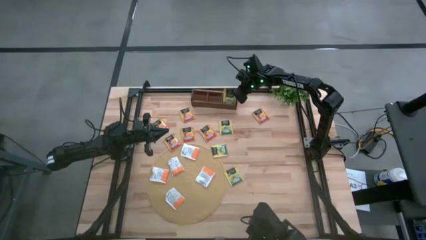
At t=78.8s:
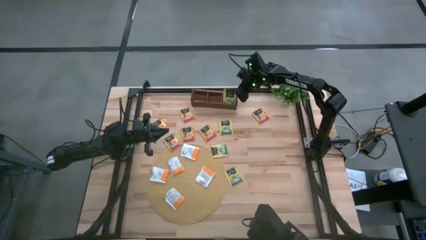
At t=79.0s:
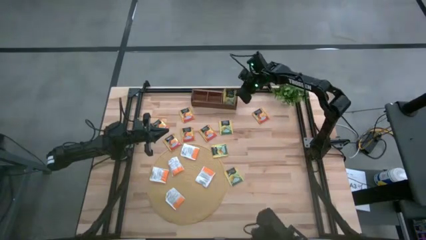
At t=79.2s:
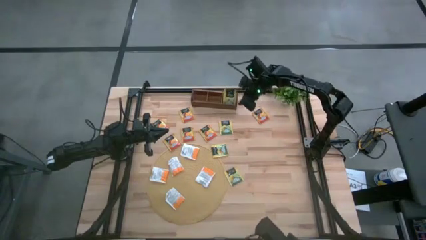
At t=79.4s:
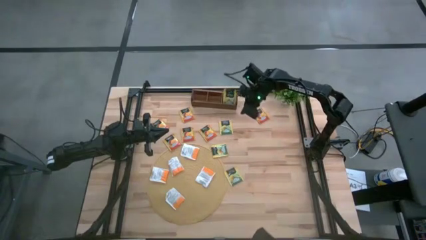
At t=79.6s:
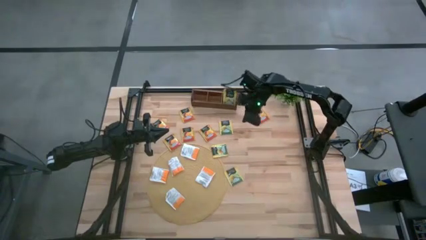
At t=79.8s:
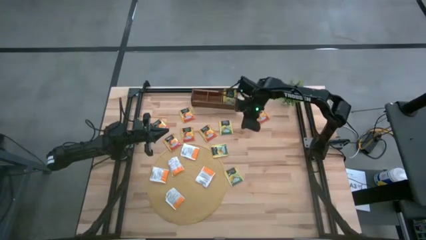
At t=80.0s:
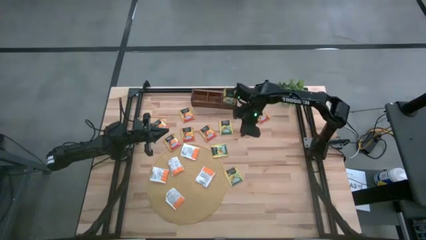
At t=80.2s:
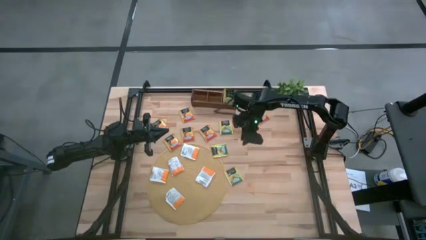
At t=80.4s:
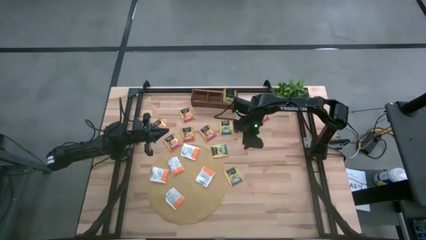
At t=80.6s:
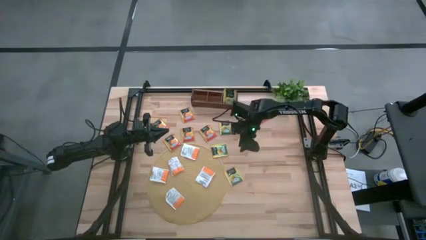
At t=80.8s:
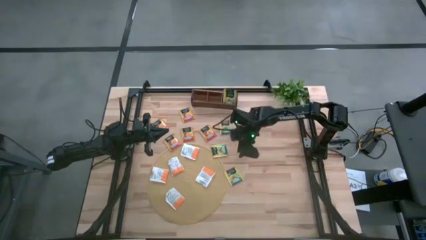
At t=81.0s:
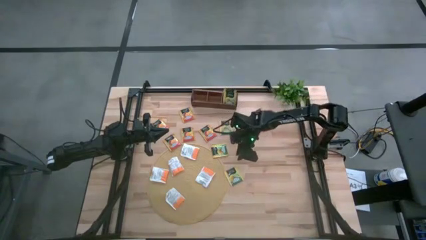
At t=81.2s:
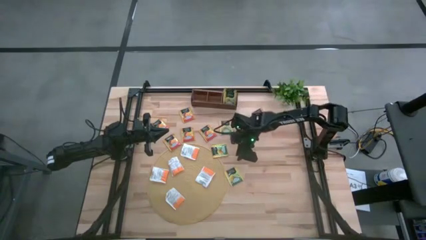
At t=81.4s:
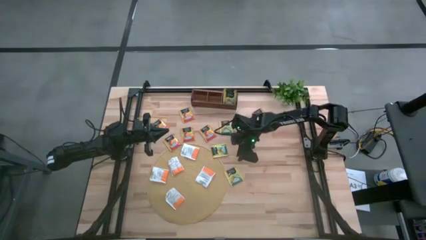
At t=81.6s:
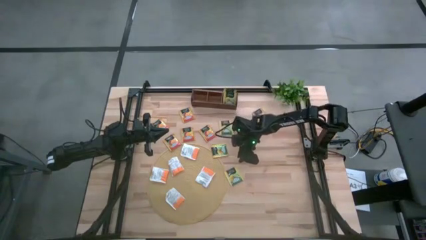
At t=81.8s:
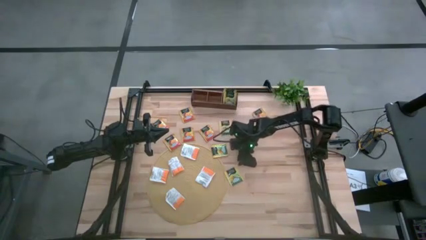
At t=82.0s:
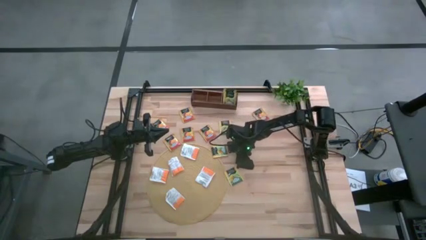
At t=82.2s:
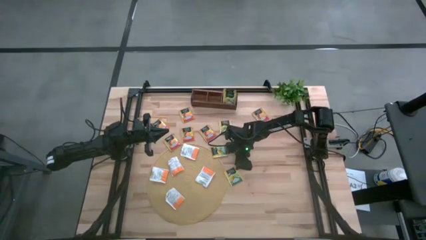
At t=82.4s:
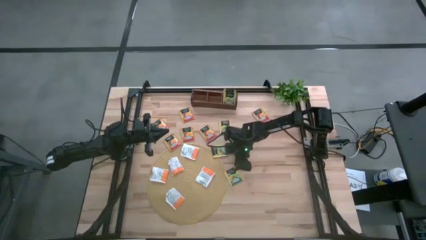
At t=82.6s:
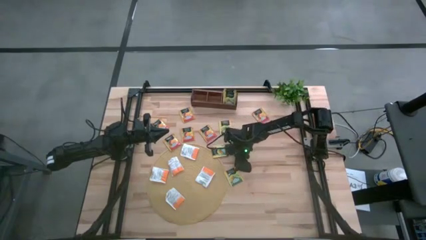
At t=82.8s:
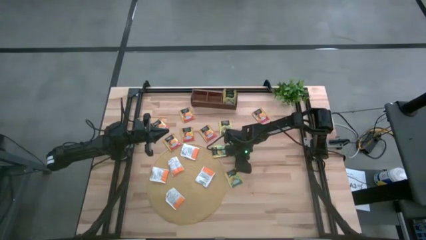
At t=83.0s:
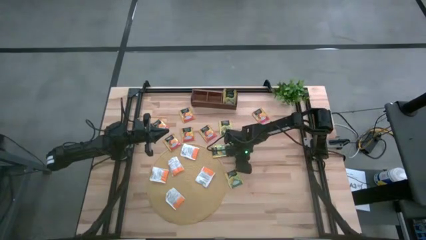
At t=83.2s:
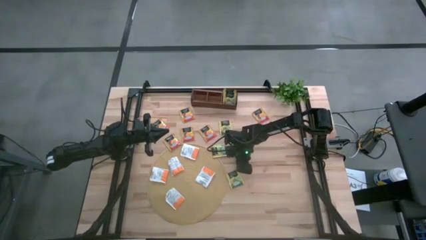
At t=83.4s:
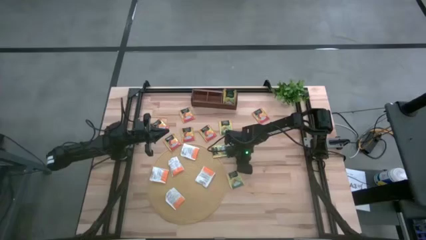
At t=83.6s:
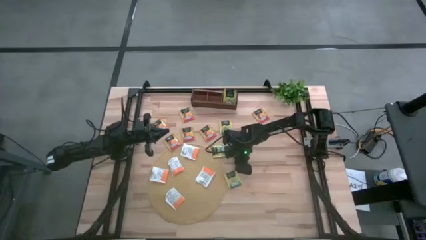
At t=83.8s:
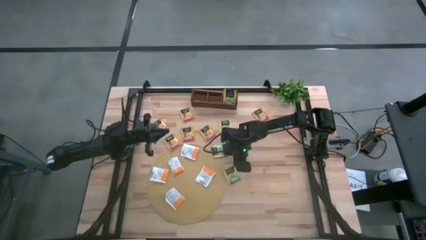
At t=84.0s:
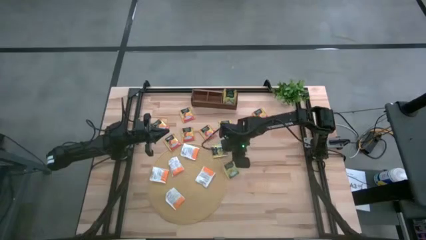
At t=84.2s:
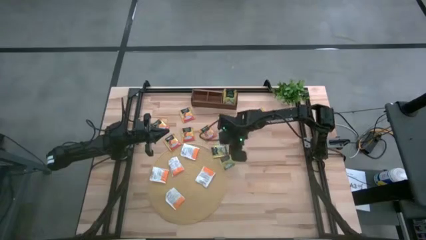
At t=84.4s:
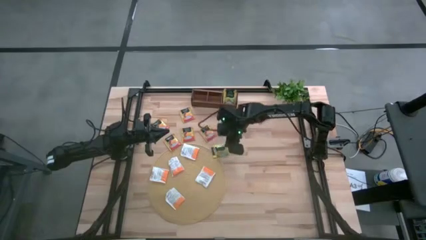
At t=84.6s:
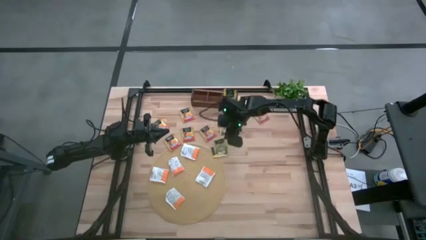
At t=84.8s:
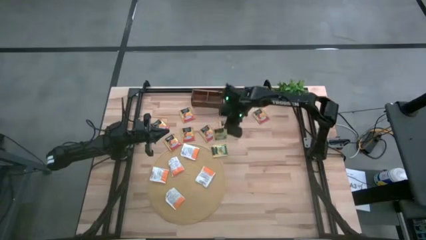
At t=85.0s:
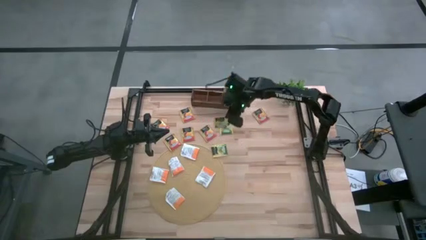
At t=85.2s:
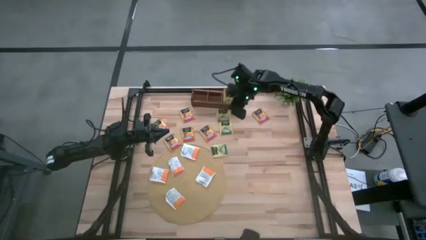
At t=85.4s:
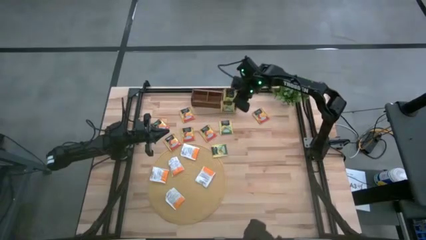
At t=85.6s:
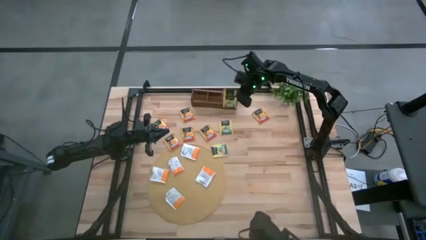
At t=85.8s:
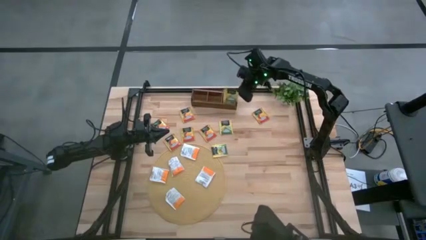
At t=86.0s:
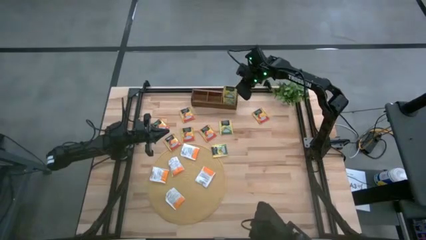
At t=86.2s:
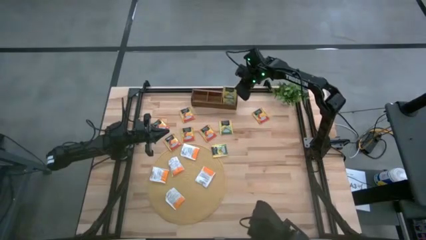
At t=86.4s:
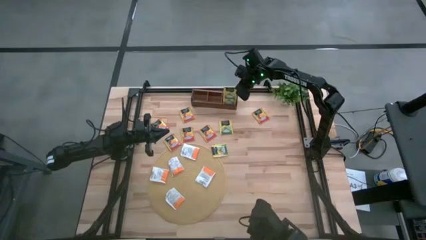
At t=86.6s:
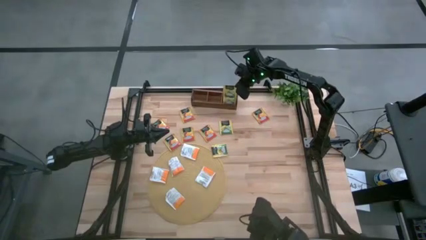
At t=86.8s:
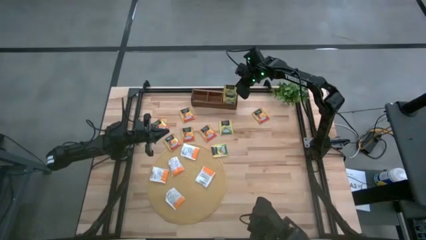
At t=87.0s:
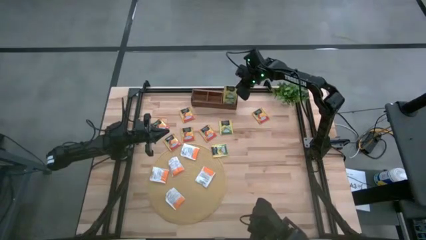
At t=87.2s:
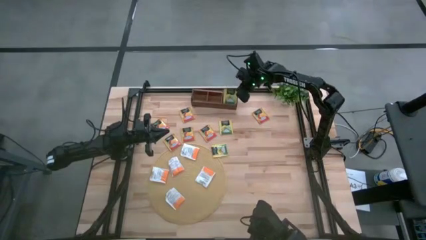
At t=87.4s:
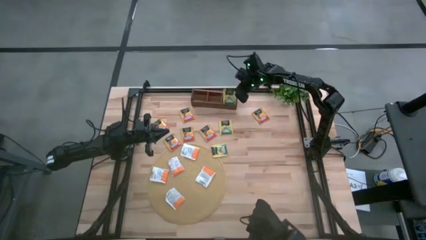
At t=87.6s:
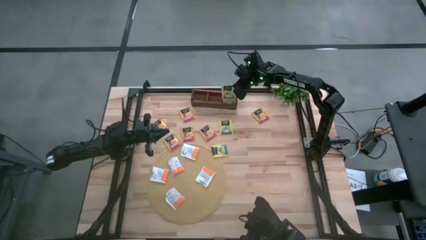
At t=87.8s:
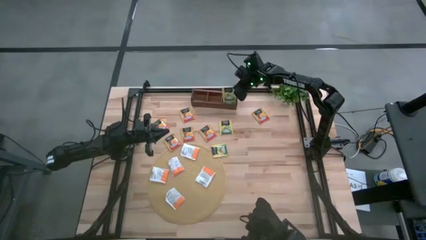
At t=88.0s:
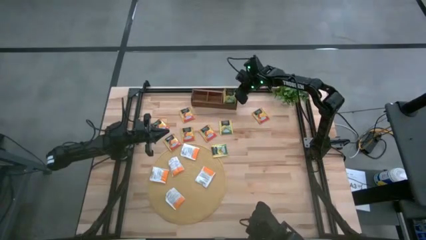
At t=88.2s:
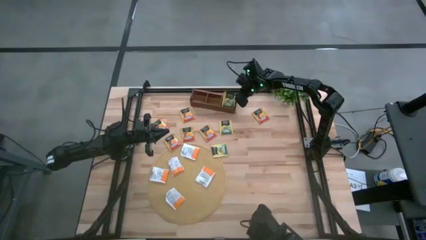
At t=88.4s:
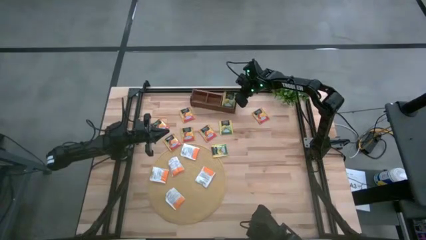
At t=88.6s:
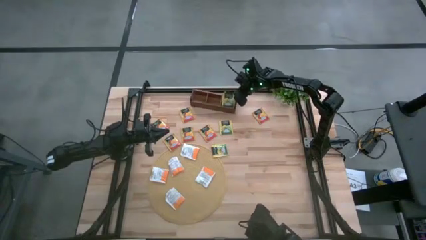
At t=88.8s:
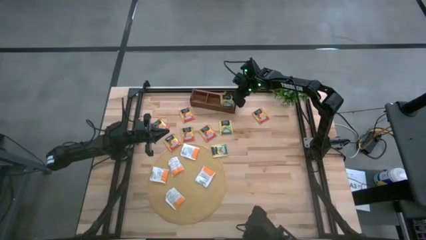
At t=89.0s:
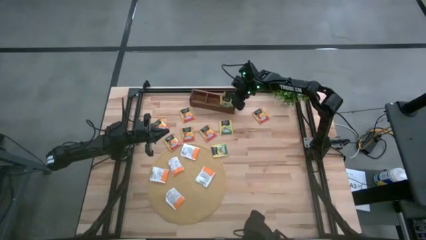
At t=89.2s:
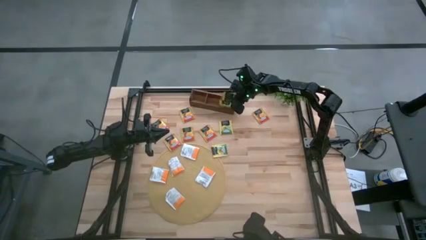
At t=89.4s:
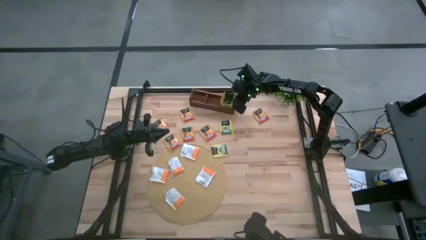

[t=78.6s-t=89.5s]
Task: Pick & Place Tea
Put the bottom green tea bag into the right slot of the wooden organizer

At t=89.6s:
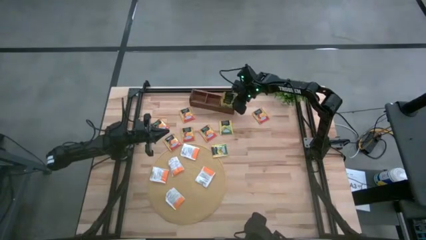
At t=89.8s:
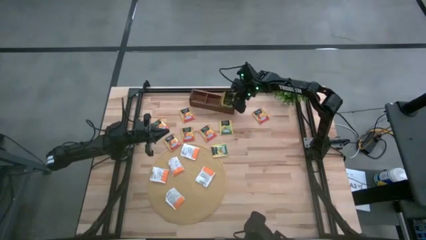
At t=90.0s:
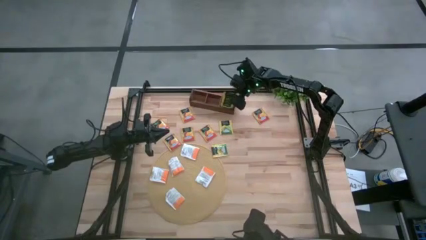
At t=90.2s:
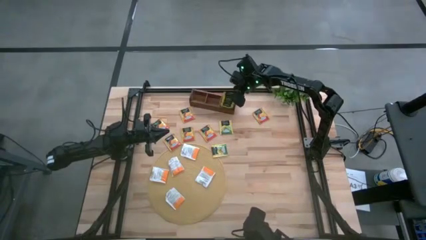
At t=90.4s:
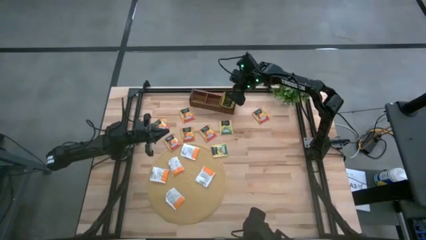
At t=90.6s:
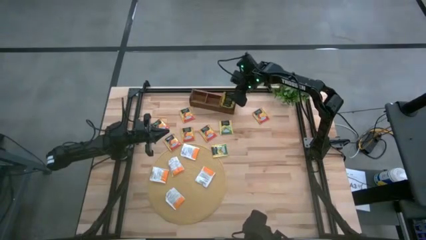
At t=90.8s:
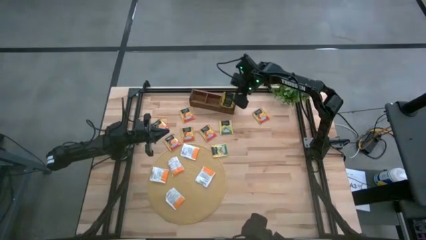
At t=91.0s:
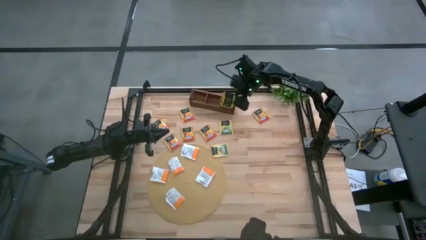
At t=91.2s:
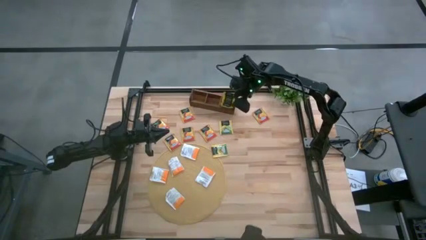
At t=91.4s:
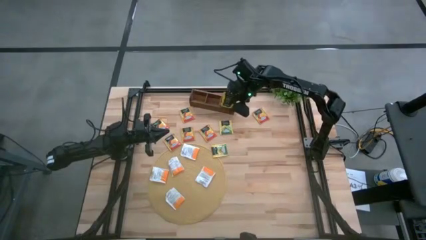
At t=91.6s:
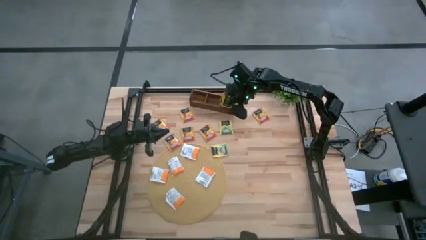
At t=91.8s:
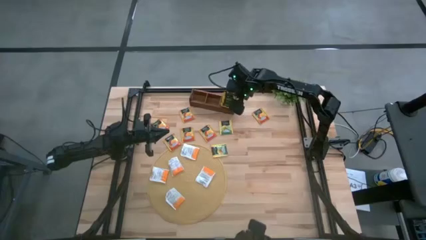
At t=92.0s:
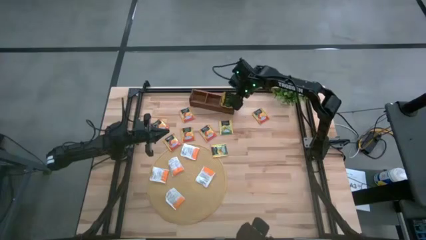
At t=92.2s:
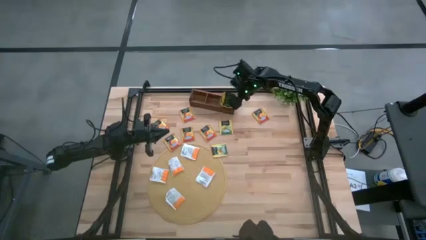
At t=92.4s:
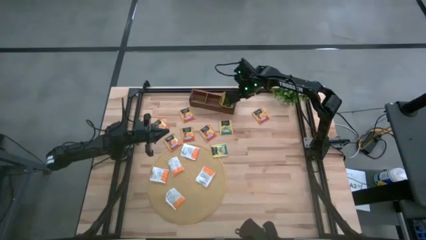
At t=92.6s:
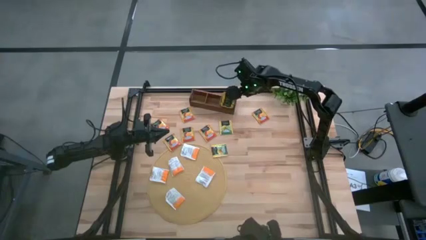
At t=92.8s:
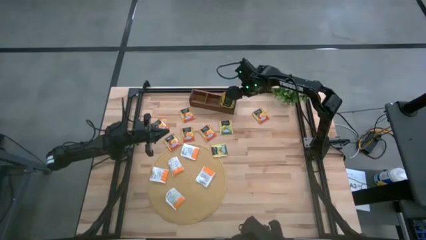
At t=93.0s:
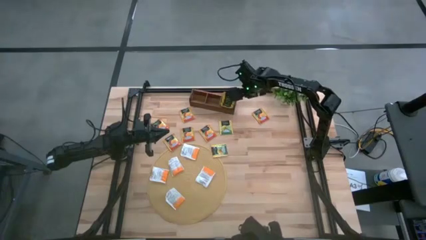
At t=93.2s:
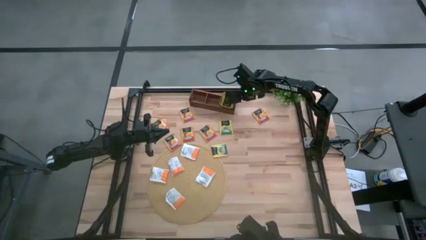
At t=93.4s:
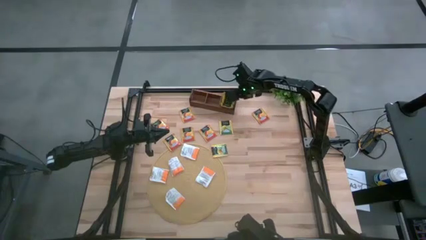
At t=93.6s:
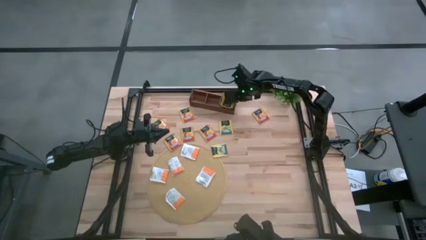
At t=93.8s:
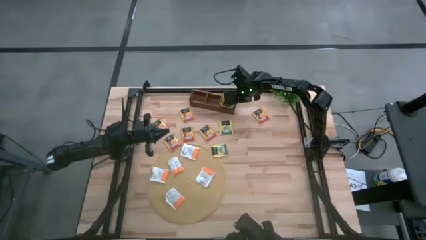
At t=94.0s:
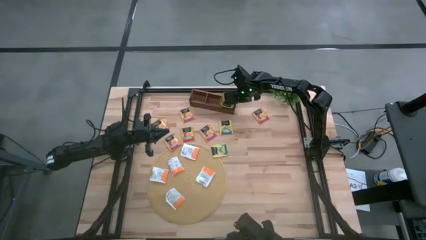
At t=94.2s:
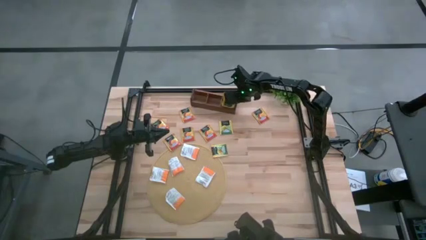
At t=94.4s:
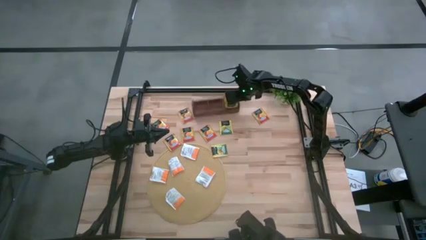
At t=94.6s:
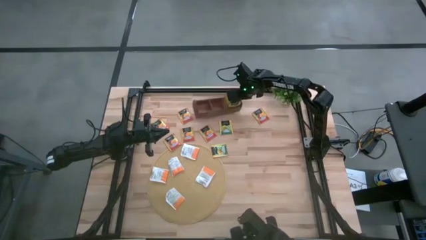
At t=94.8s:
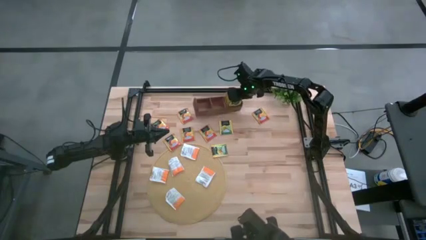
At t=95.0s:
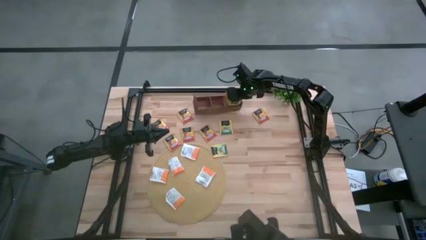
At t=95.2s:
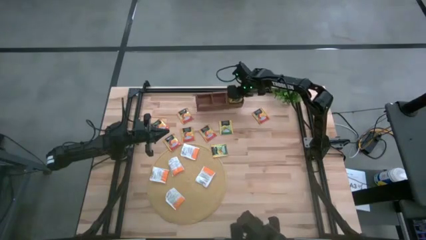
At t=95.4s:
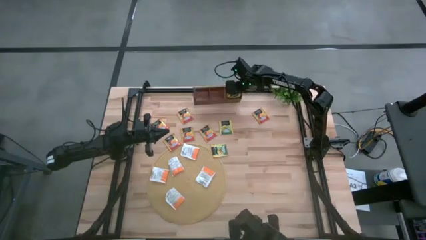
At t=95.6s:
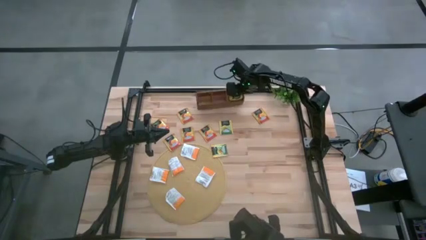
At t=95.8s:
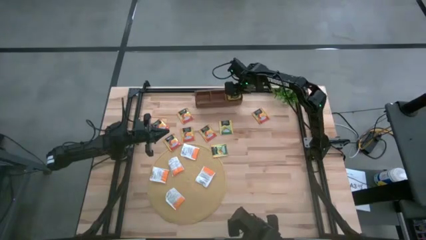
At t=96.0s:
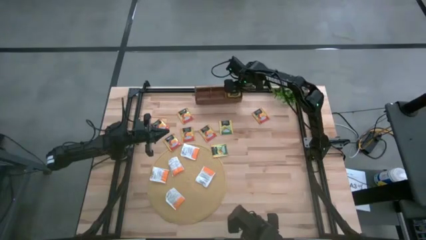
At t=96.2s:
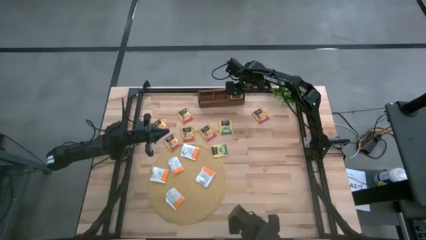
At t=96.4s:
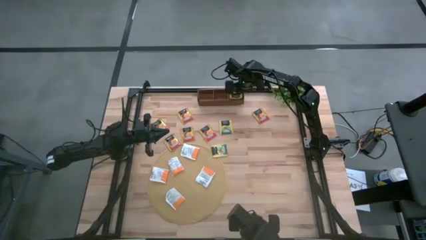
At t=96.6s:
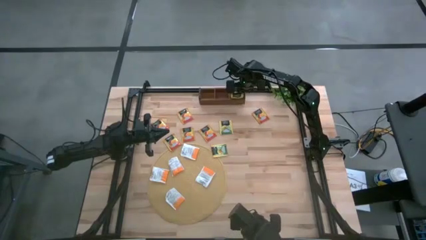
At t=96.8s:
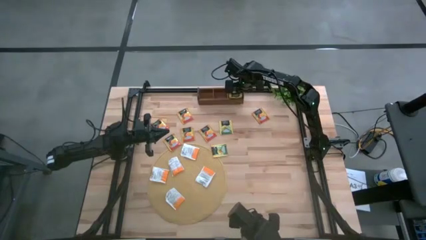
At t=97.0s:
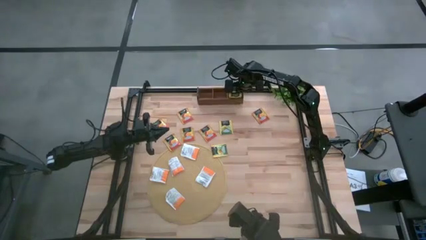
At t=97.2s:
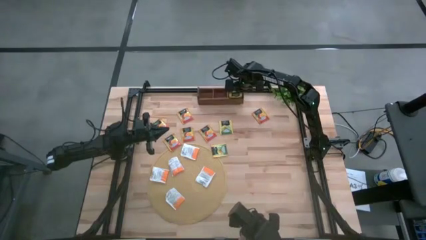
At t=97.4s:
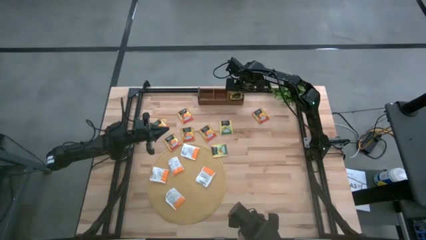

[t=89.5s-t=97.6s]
Adjust the wooden organizer on the table
